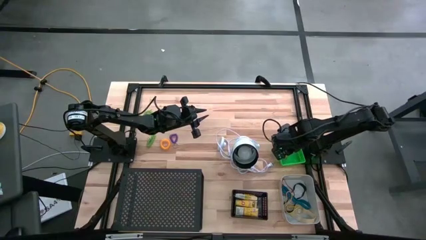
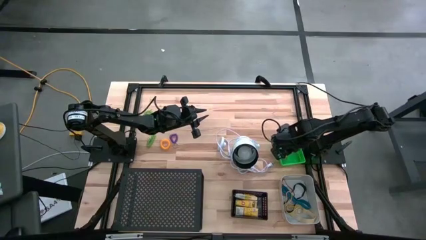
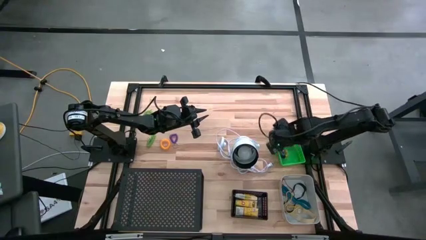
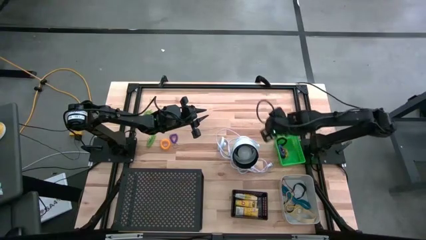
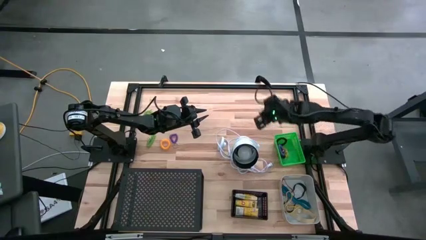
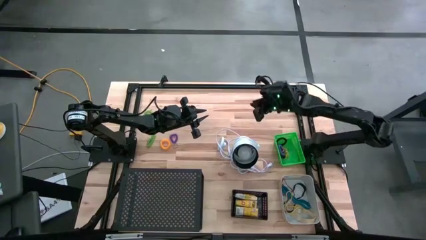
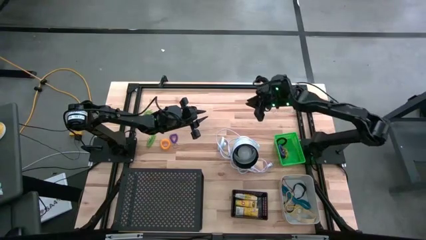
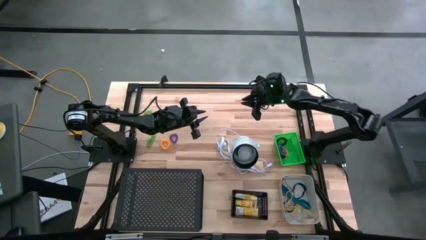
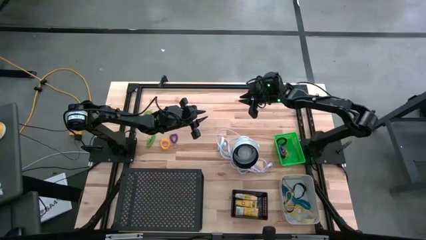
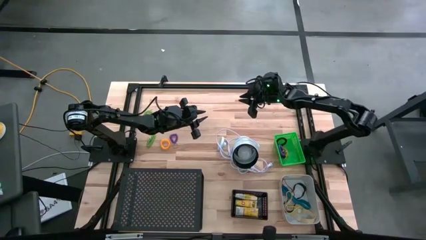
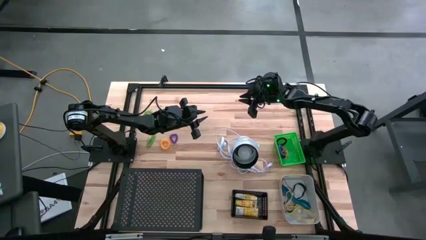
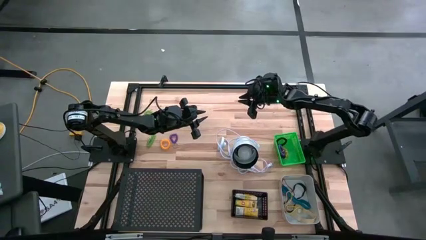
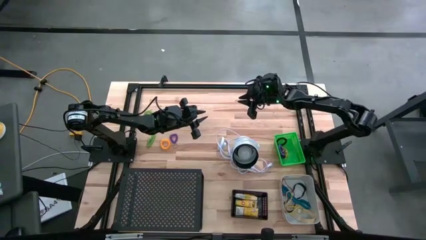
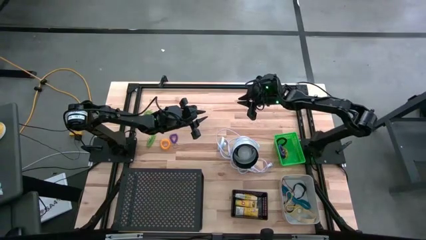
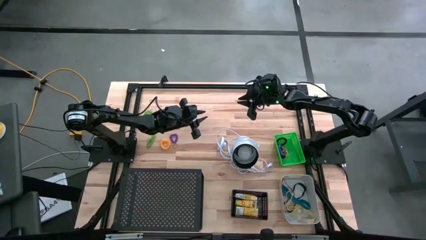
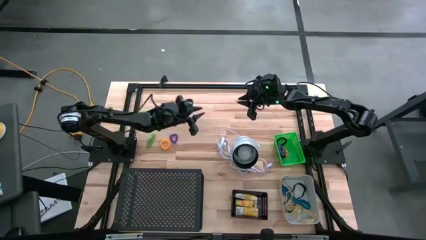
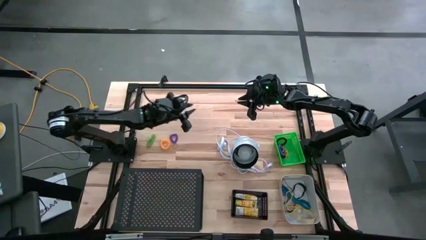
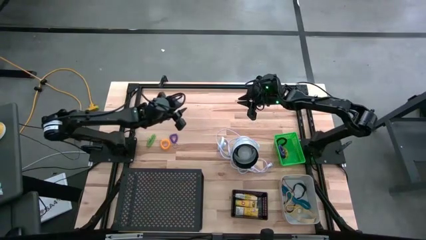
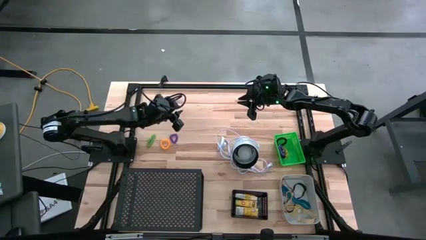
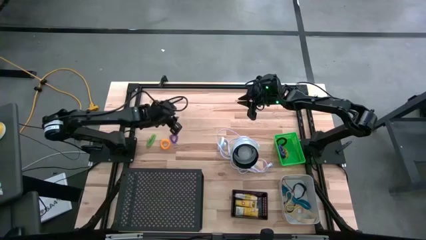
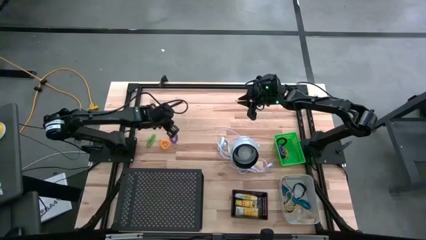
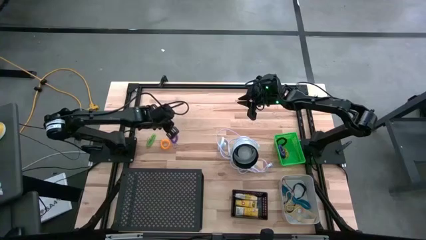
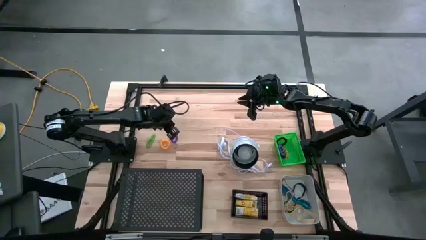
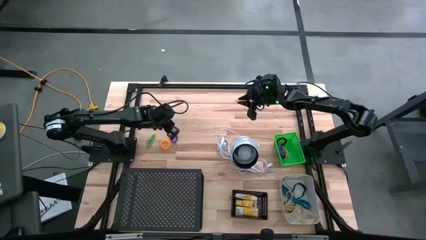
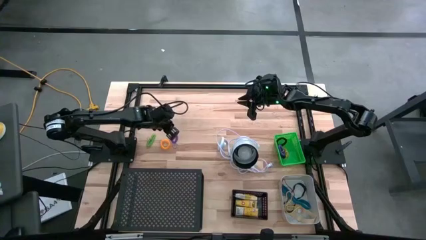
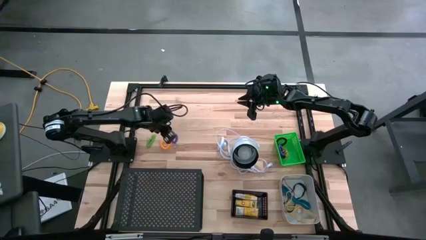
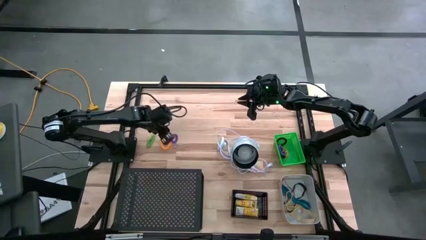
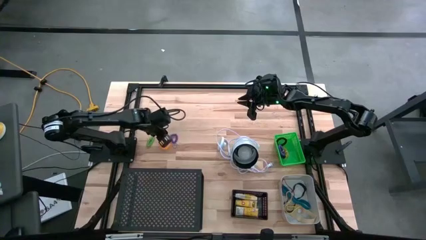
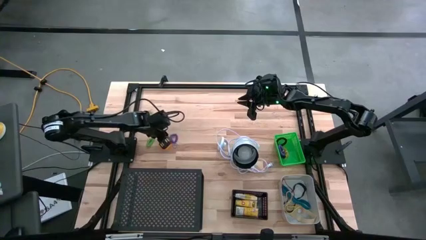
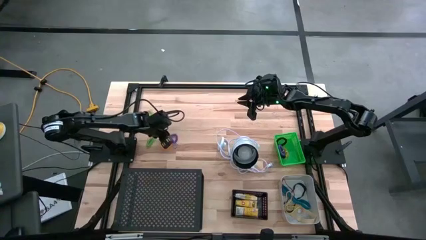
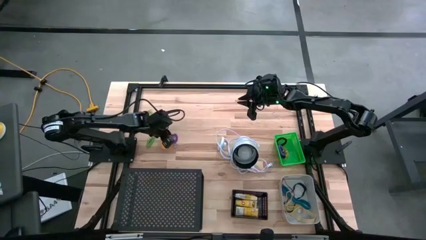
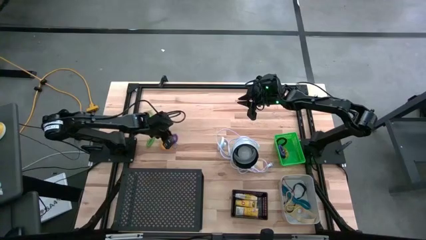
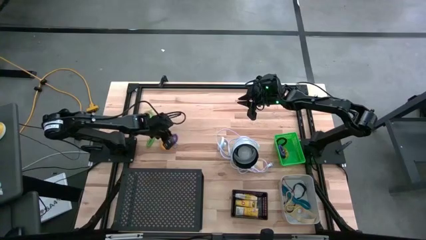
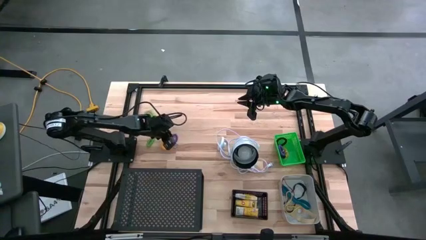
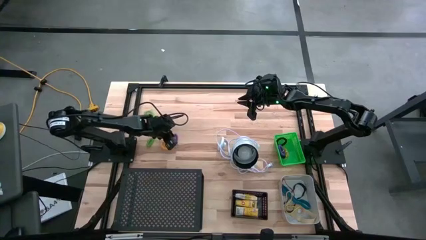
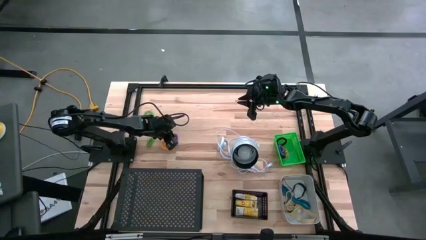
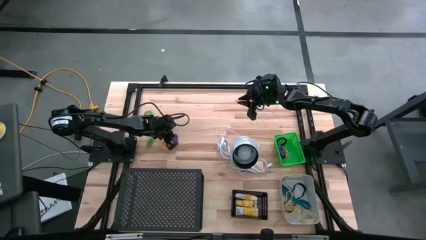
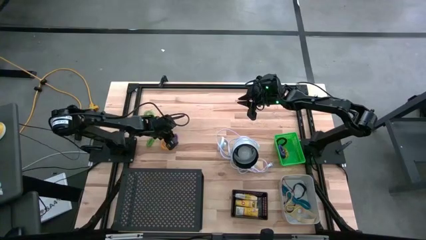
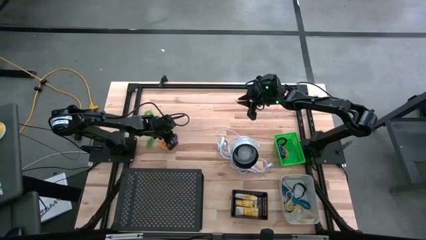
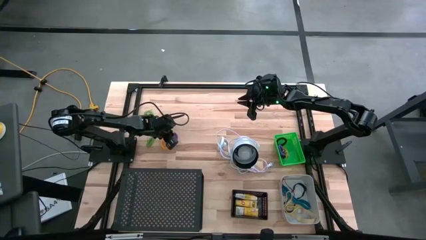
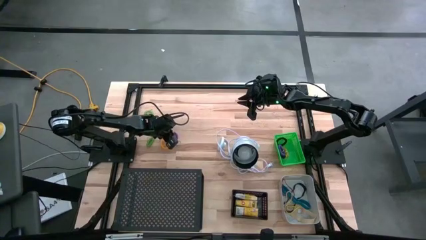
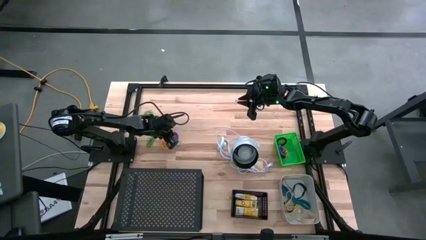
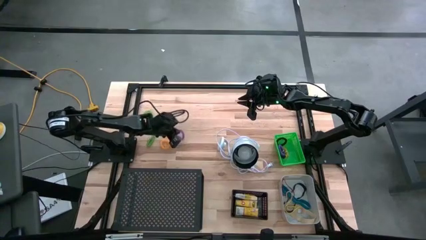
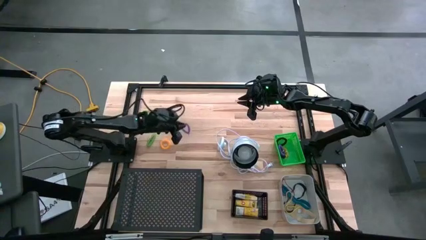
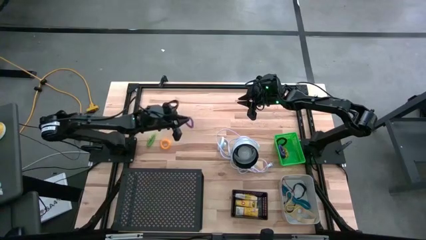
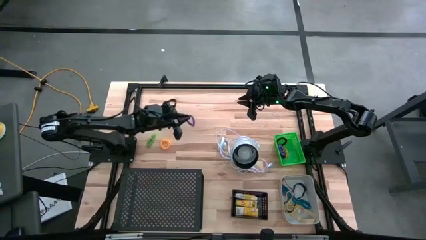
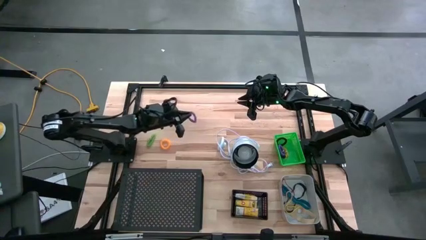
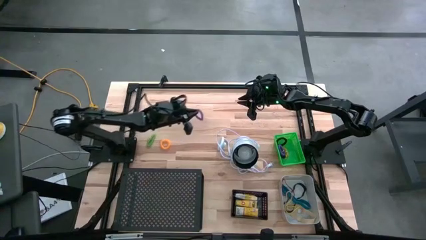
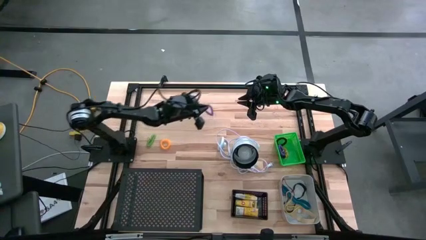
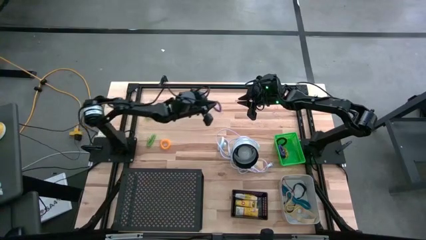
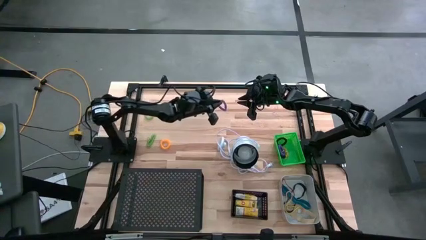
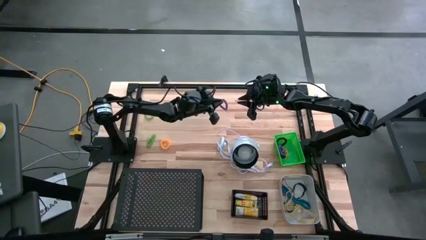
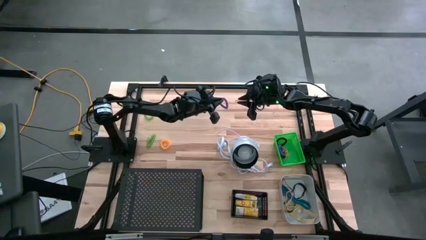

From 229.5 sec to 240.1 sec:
Task: Pick & Place Office Desk Supplies
Put the purple spring keychain into the green bin

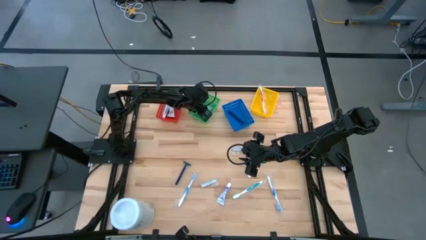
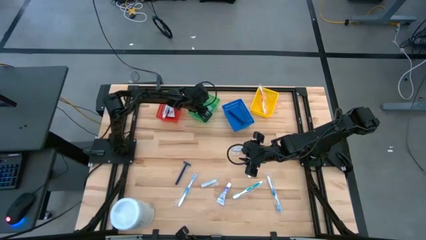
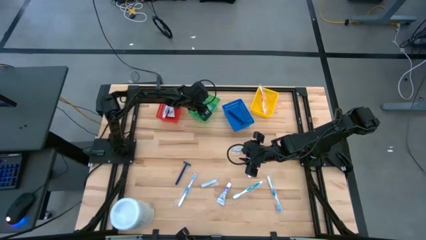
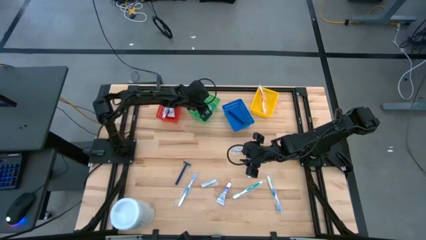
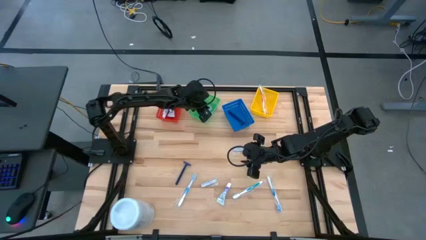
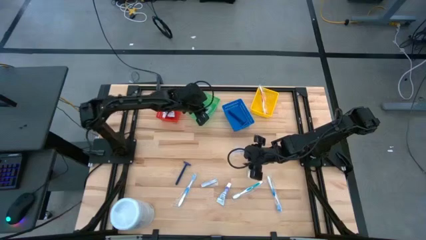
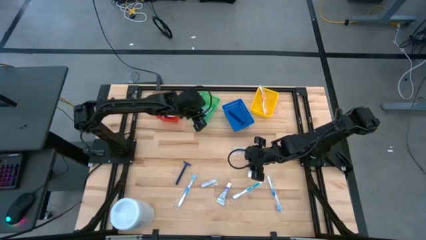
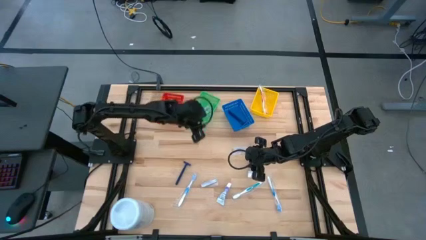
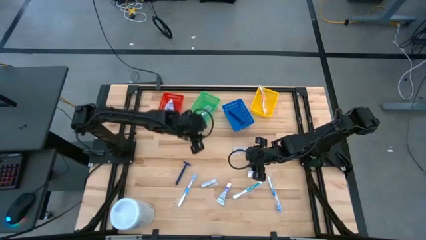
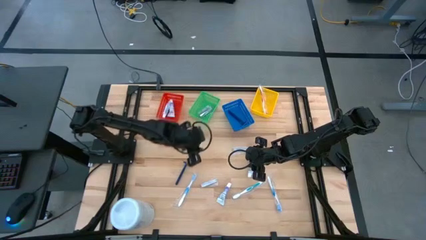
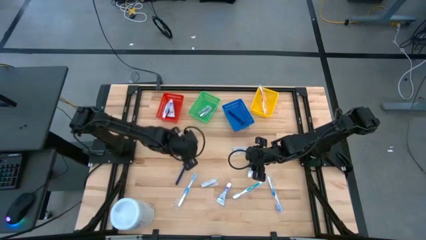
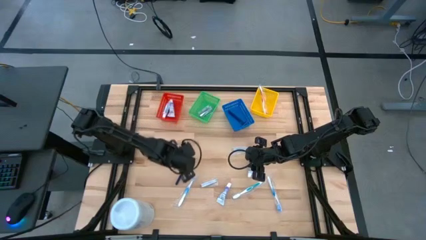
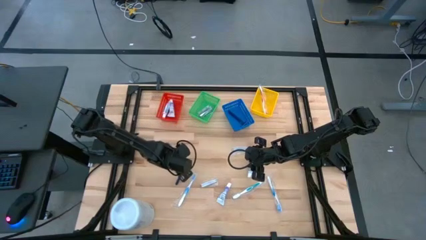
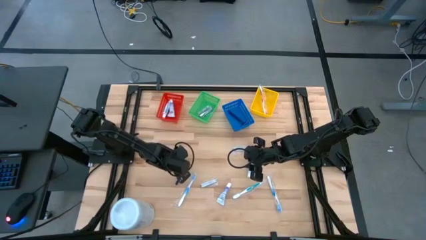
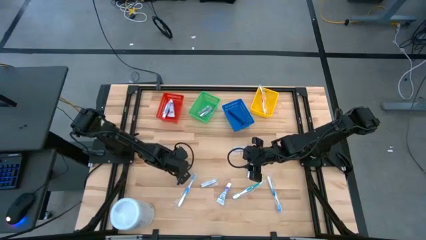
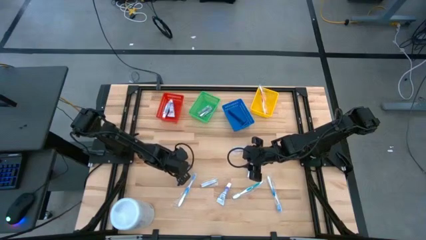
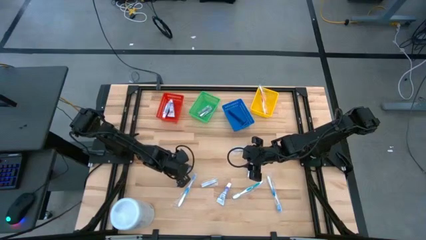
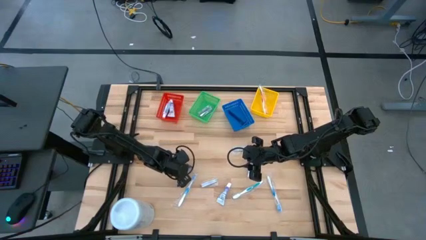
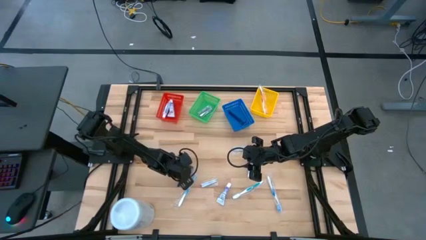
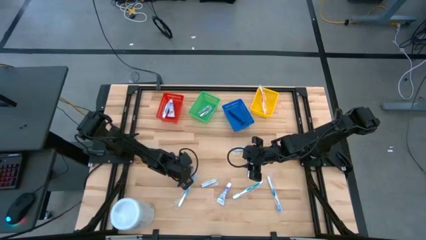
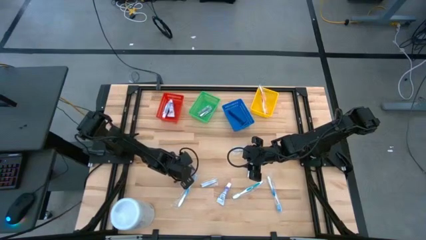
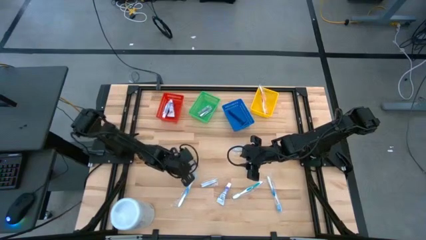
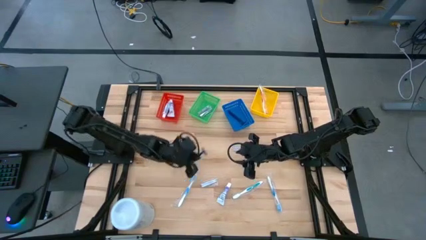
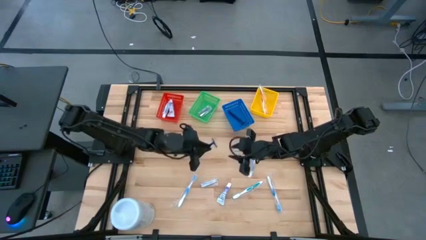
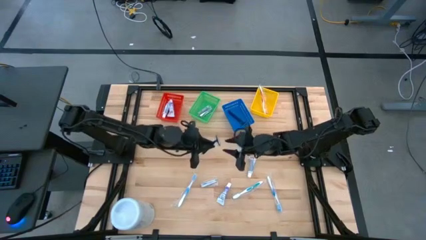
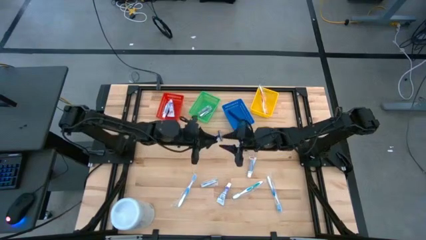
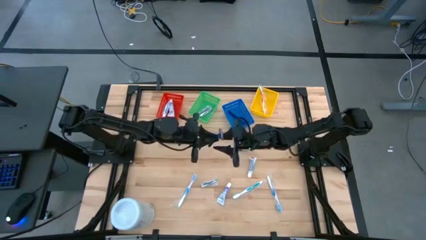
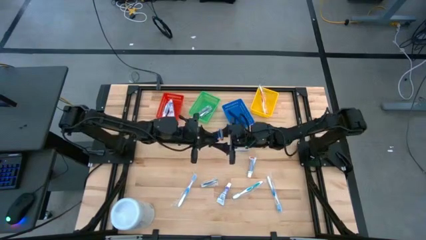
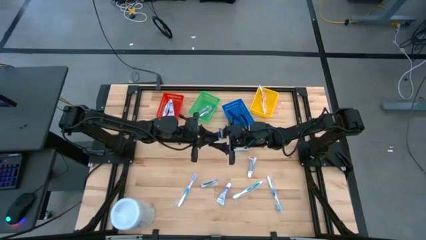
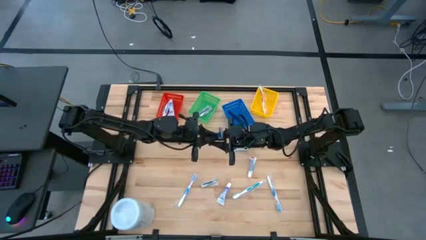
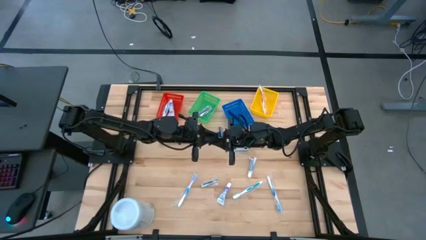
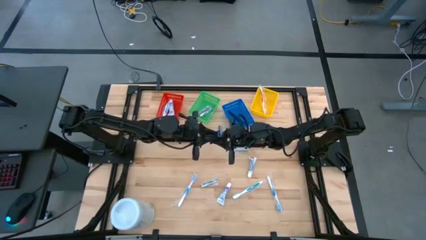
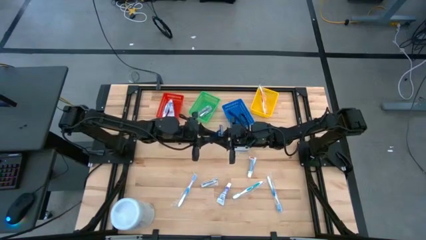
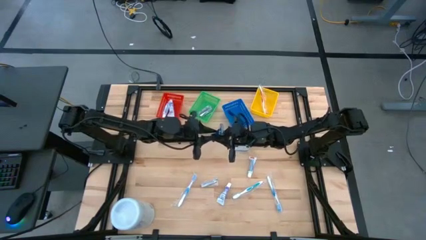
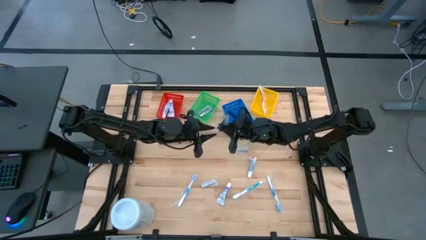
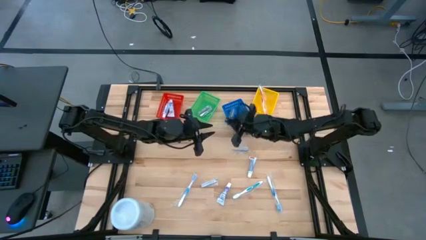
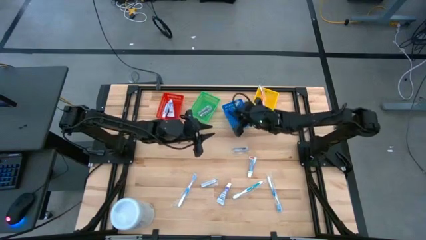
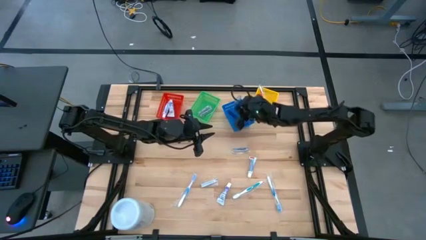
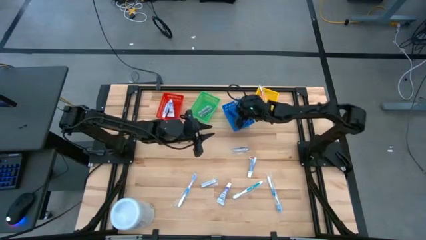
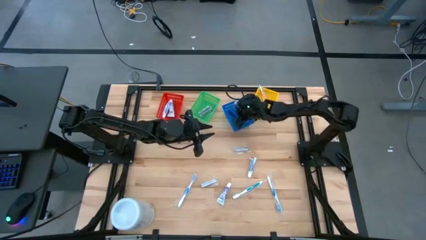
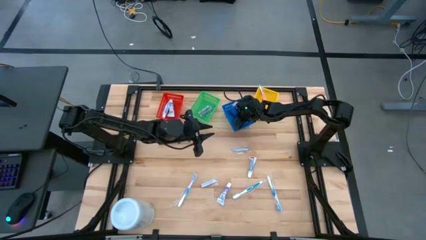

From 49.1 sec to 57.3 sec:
Task: Pick & Place Travel size toiletries
Put the blue razor in the blue bin
